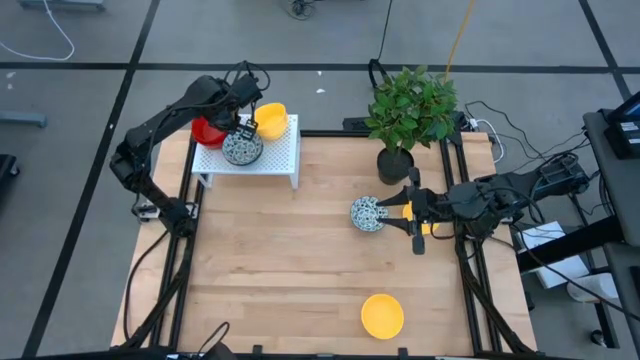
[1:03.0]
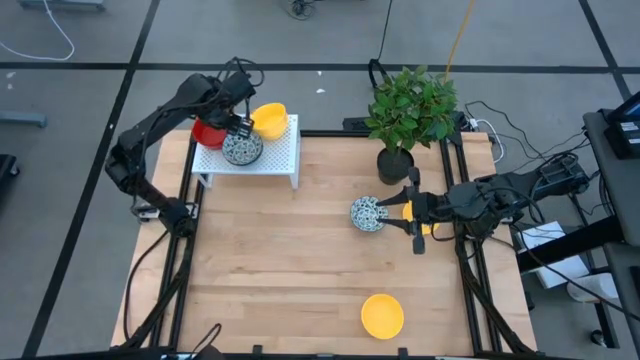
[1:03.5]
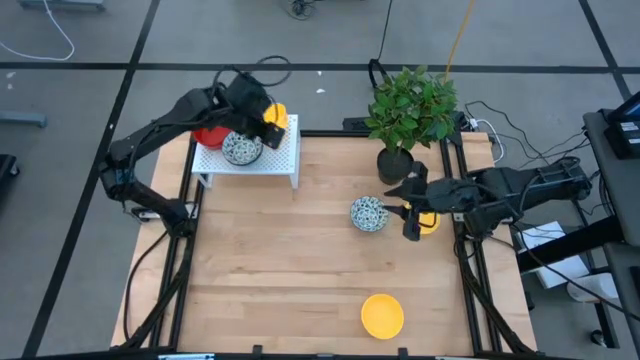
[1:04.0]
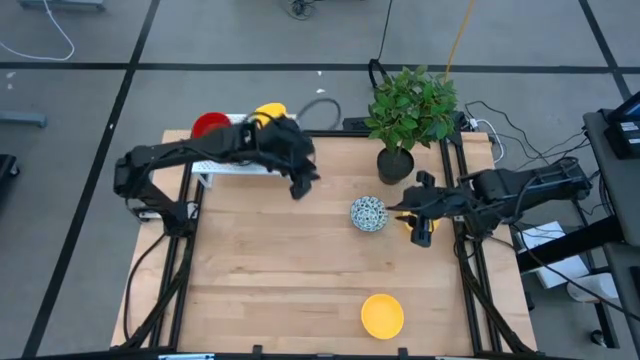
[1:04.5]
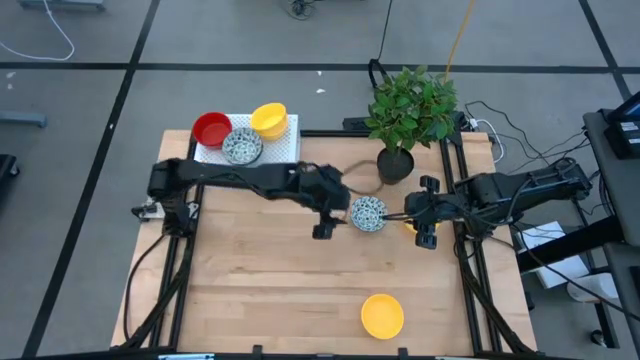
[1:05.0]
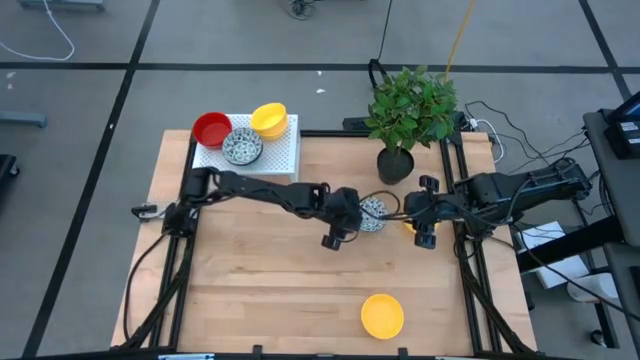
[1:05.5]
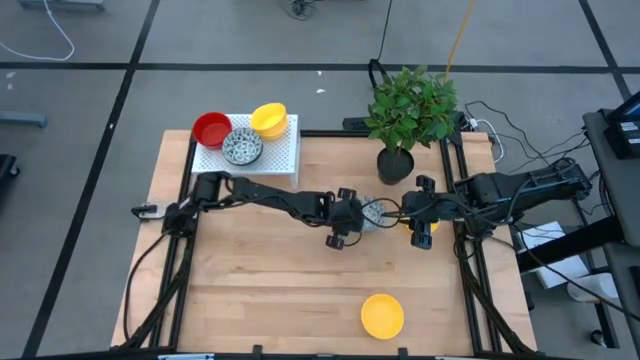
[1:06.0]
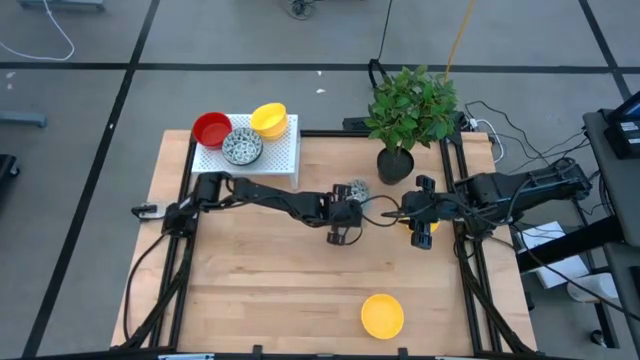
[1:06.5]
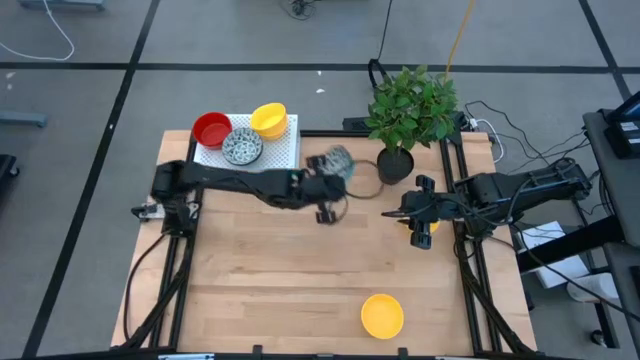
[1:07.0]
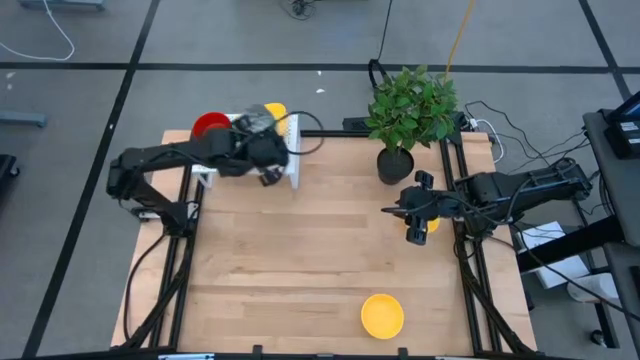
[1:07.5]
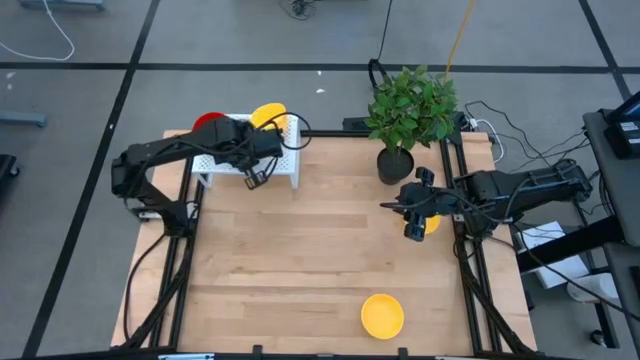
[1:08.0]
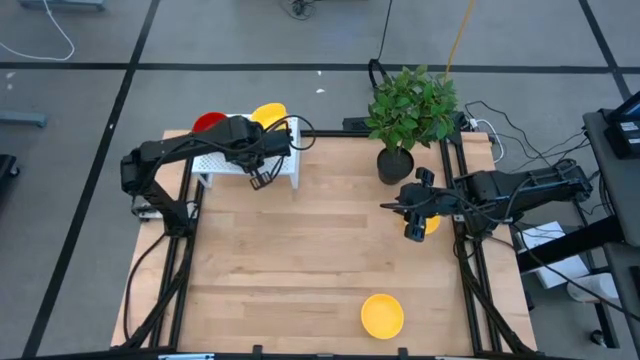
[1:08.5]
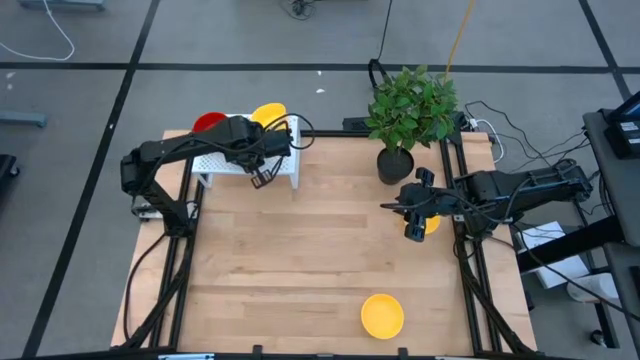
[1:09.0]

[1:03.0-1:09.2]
Task: Pick & Place Mini bowls
Stack the blue bowl on the blue bowls on the shelf

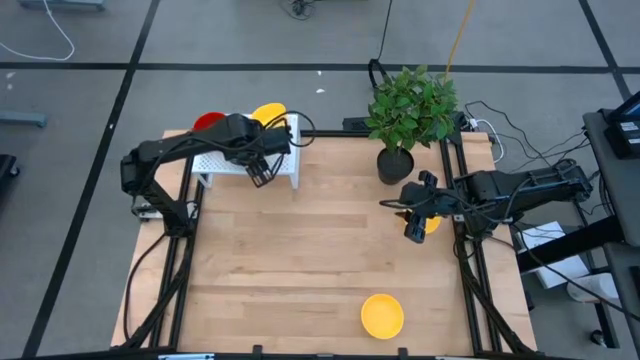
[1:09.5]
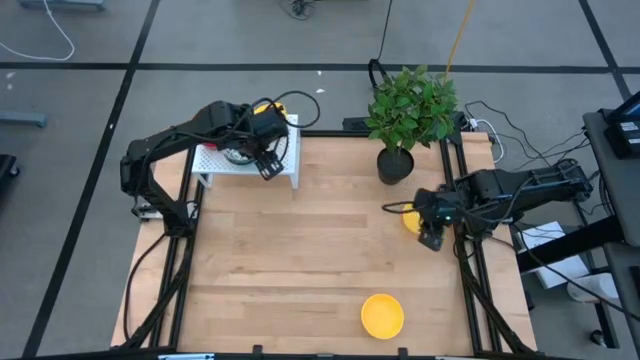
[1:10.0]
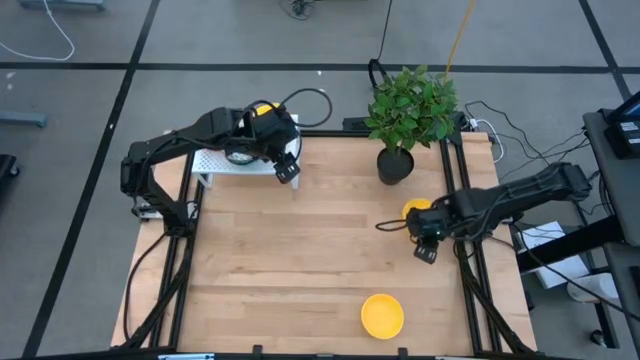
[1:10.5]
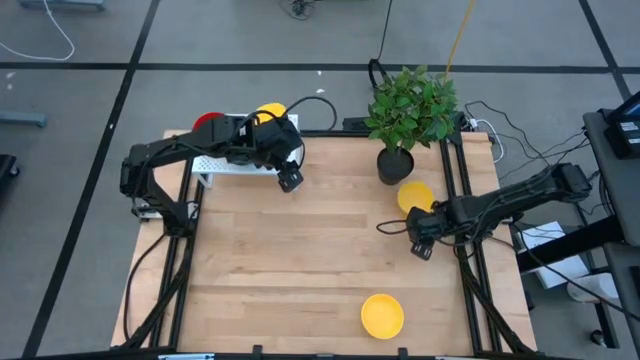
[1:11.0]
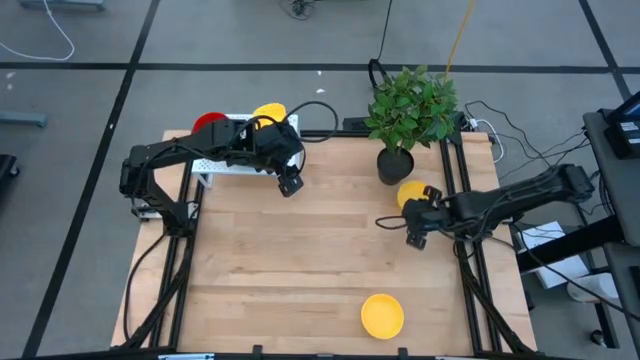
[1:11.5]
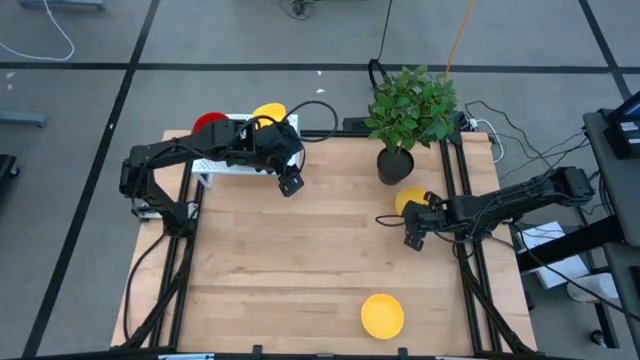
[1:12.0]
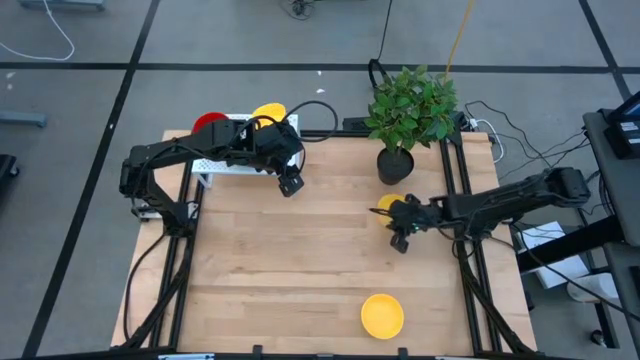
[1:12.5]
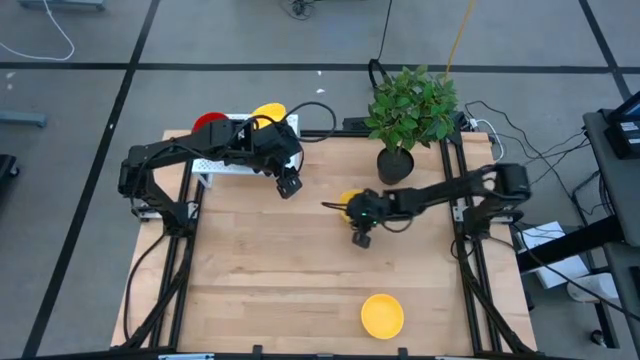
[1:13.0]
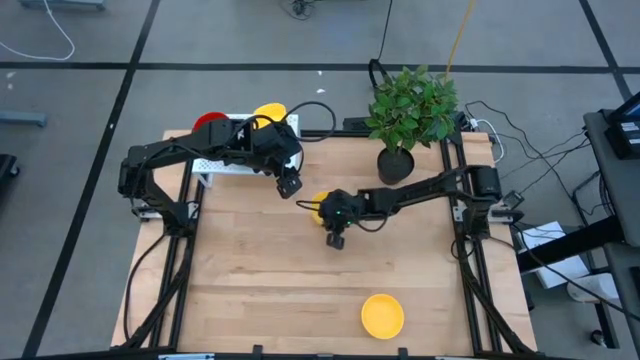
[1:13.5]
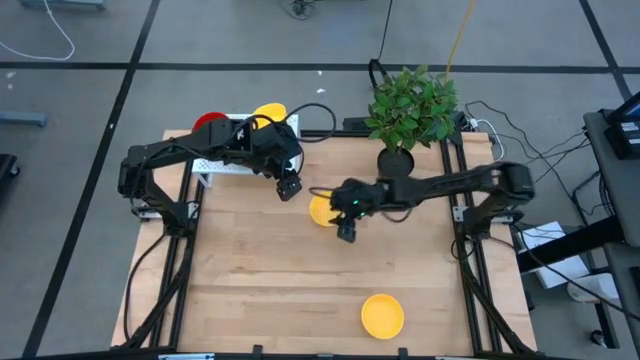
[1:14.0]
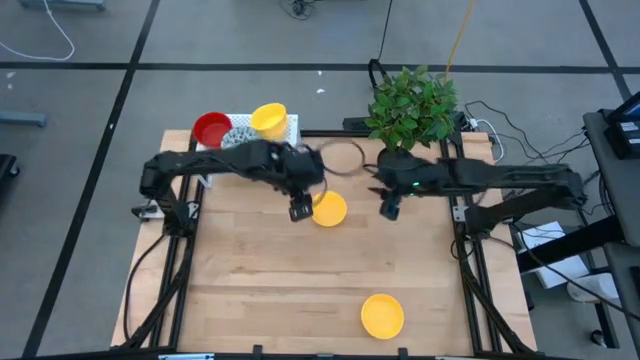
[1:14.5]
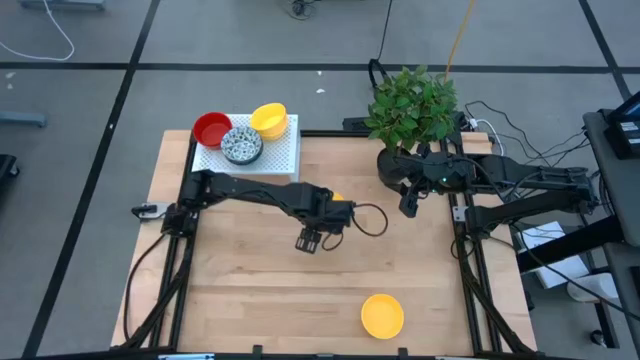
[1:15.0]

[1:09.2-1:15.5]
Stack the yellow bowl on the yellow bowls on the shelf

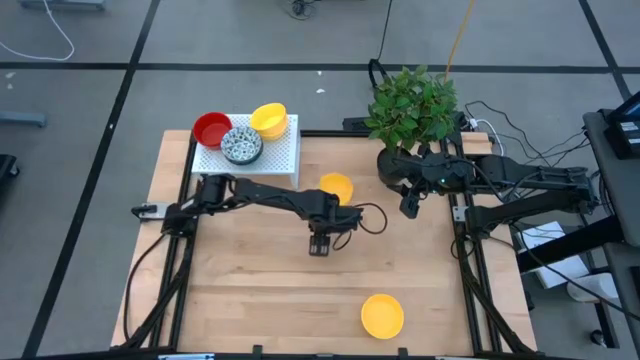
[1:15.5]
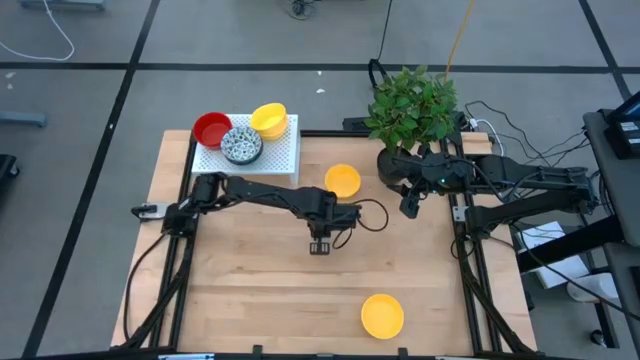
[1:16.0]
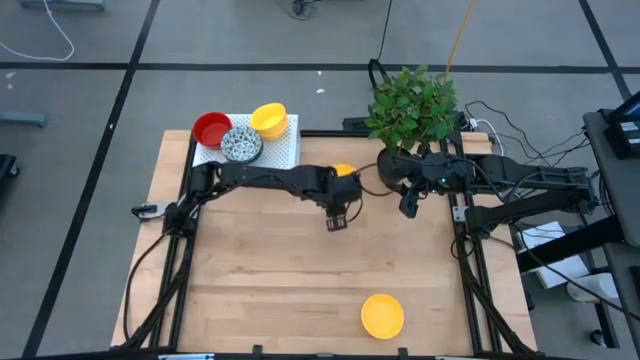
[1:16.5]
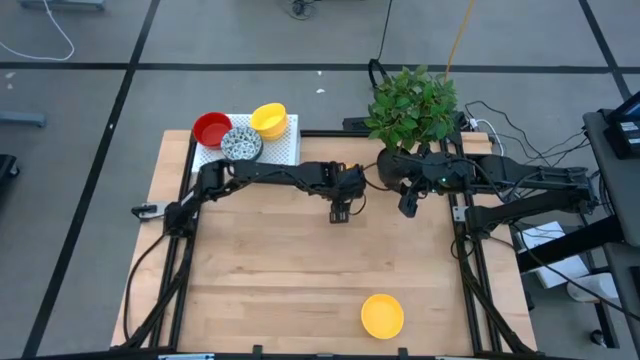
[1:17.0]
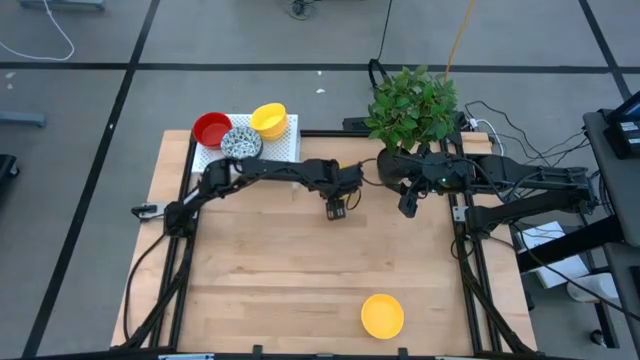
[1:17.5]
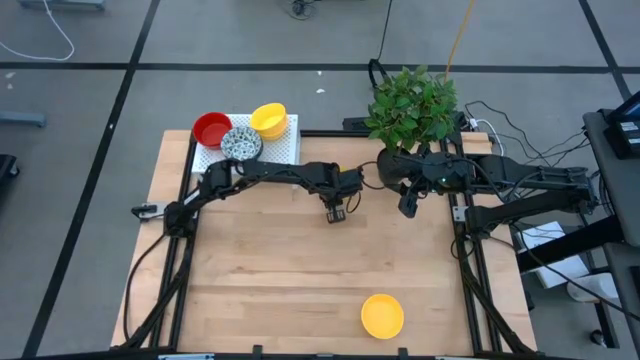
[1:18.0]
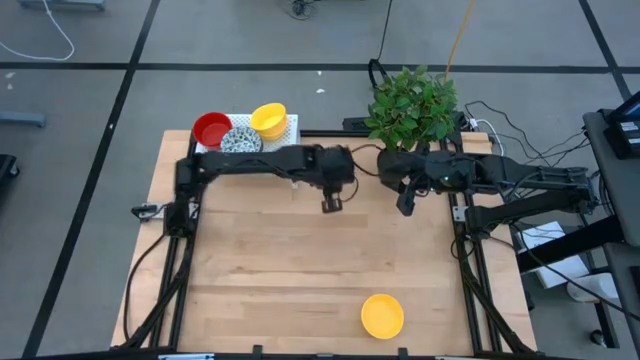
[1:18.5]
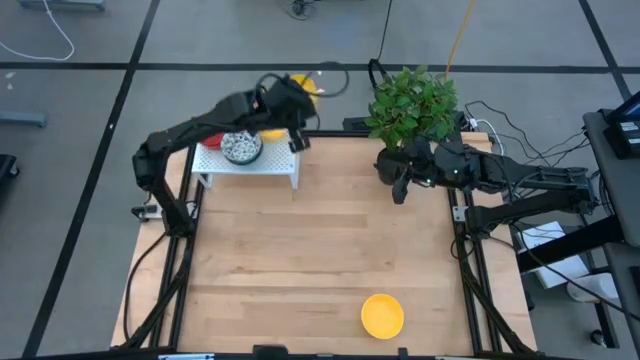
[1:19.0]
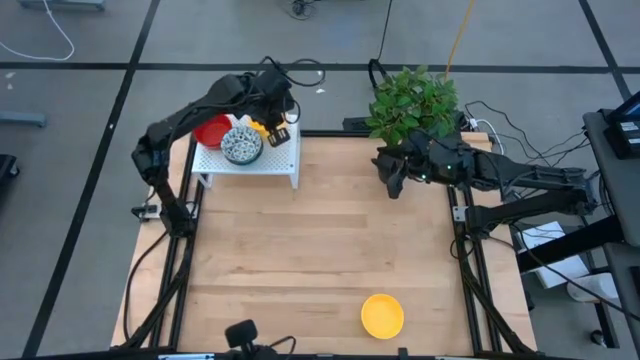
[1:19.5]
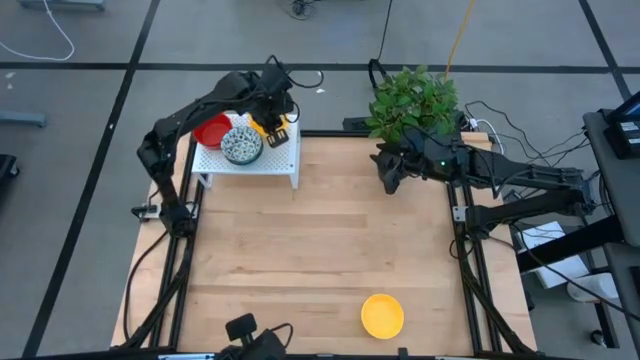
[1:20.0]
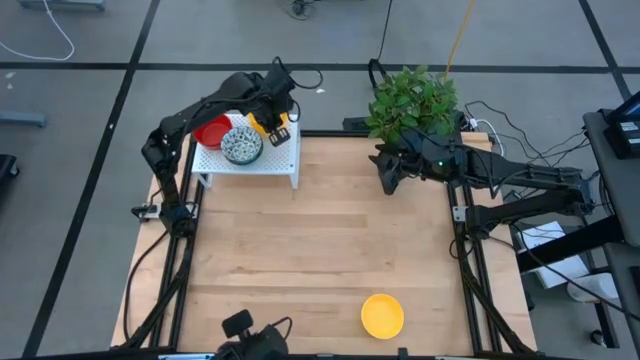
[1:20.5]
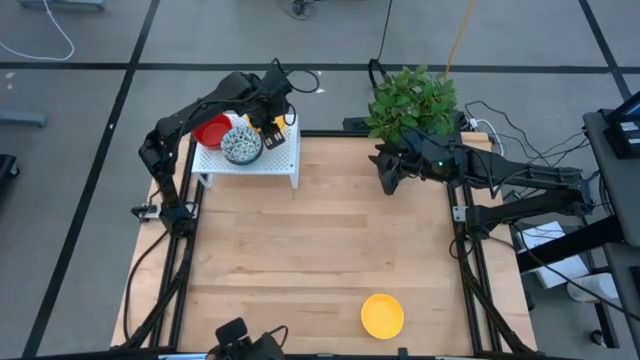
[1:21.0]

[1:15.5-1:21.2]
Stack the yellow bowl on the yellow bowls on the shelf

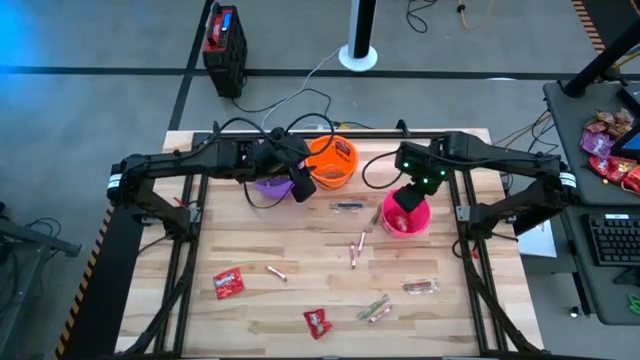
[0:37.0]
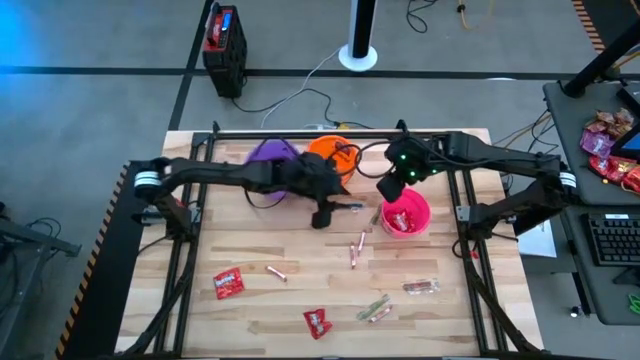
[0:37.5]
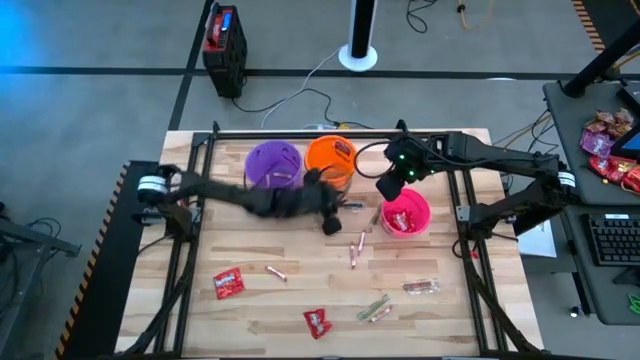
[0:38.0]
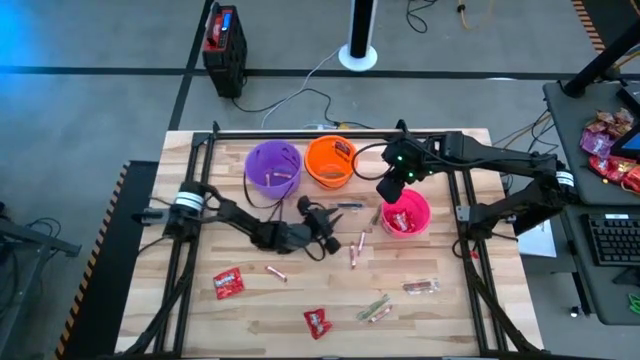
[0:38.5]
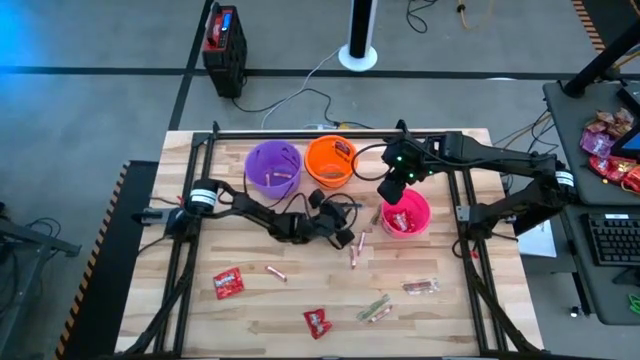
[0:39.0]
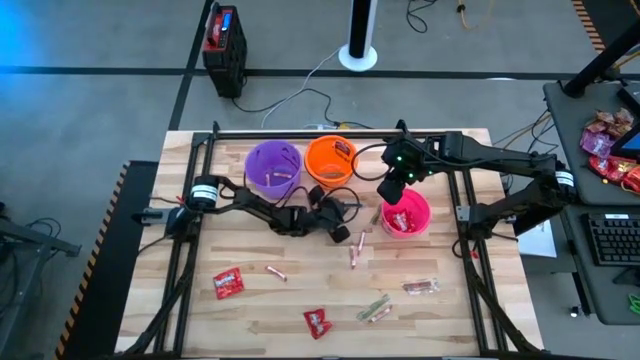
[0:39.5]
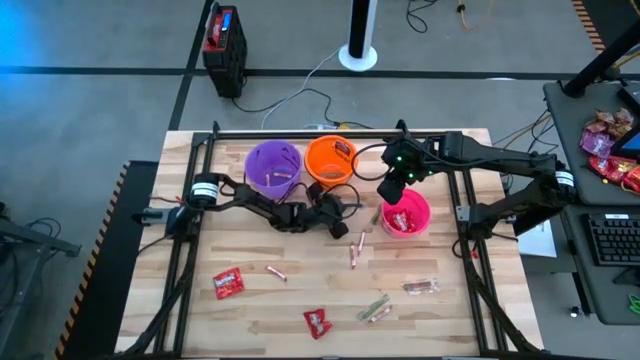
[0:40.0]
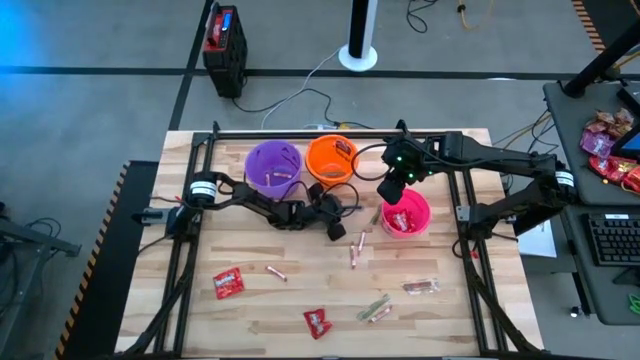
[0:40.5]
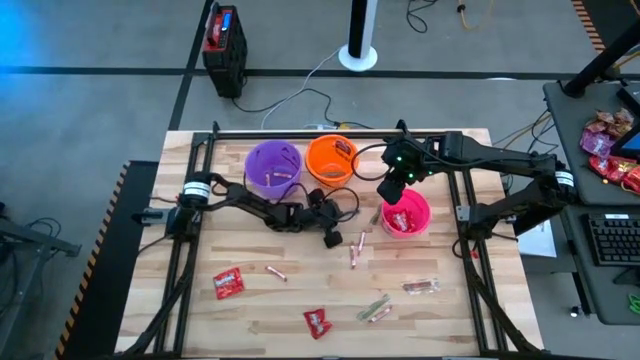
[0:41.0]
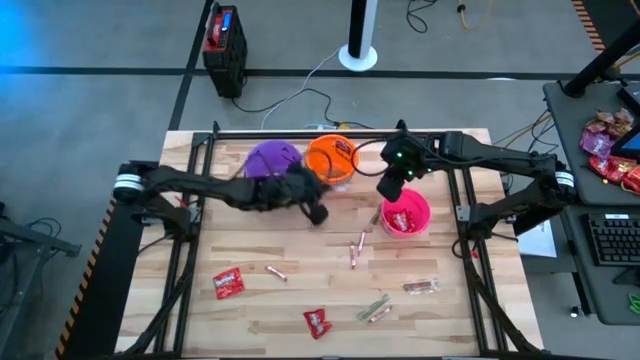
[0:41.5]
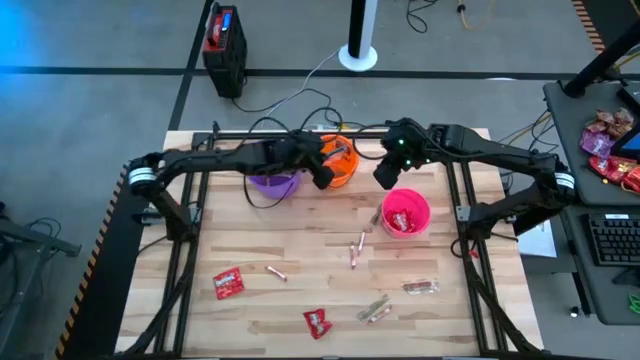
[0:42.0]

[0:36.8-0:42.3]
Task: Sort candy by brand, put in halloween buckets
Put the blue candy into the orange bucket
